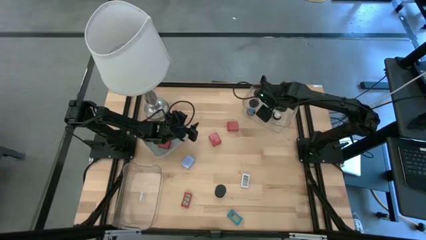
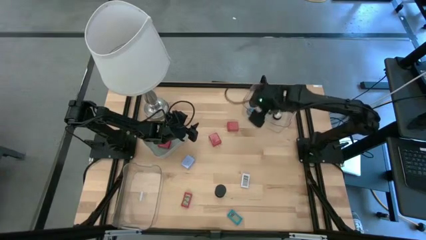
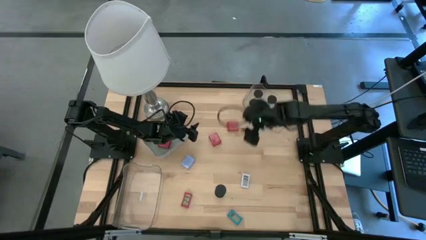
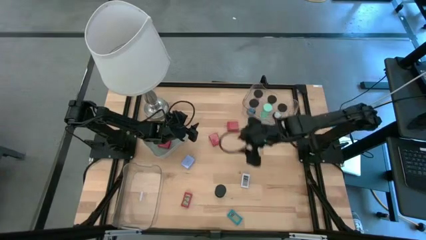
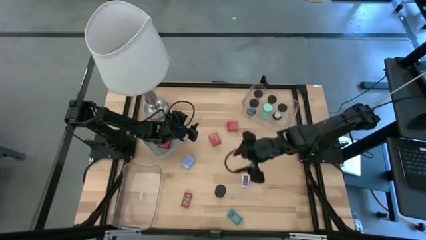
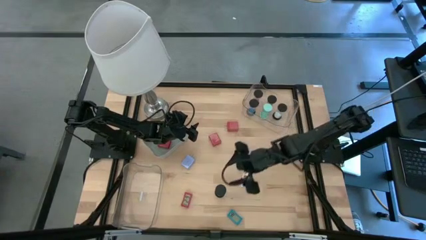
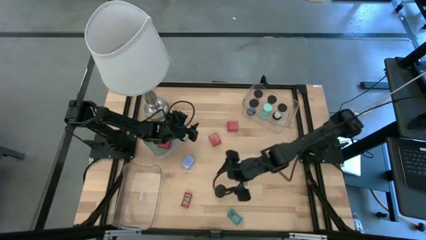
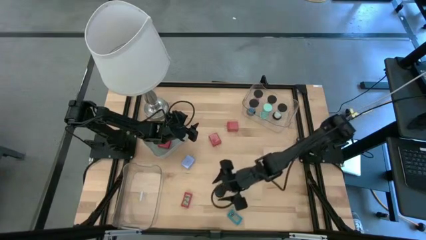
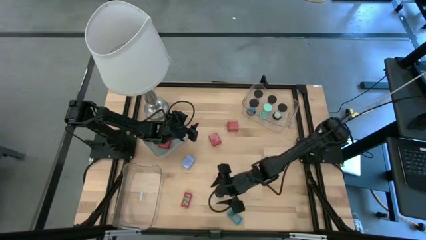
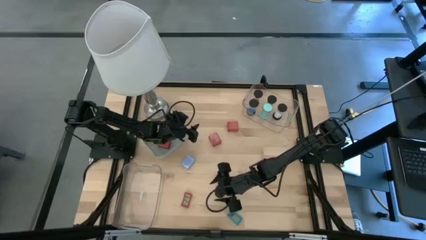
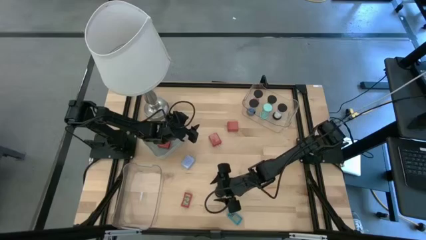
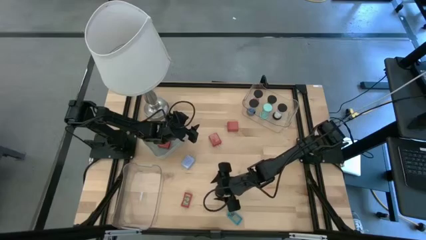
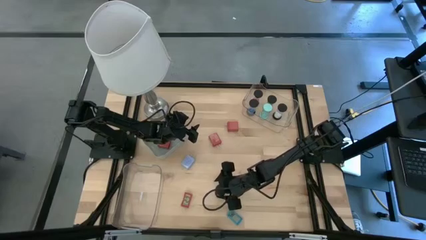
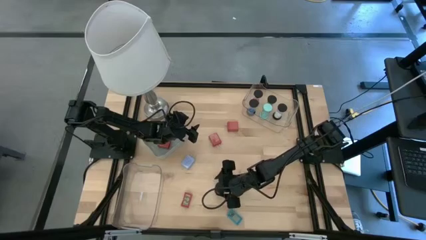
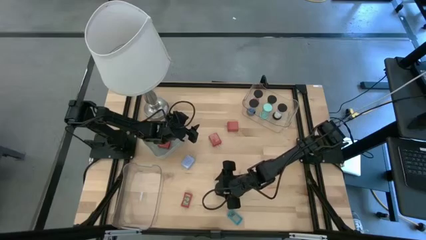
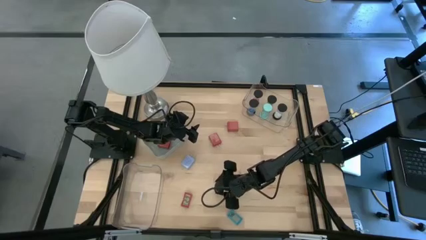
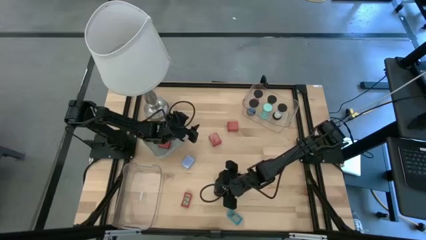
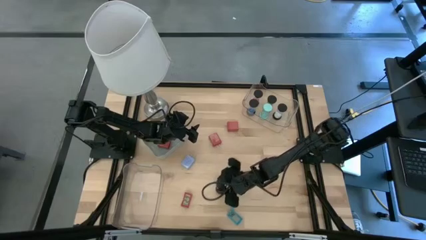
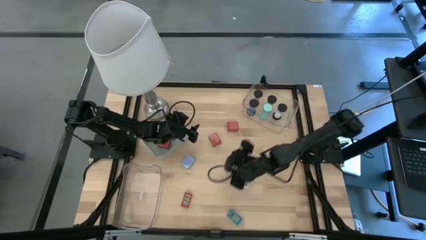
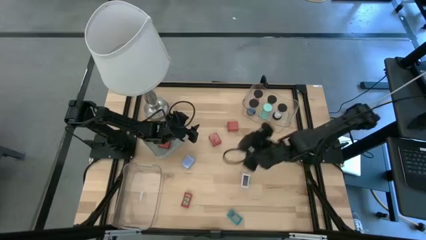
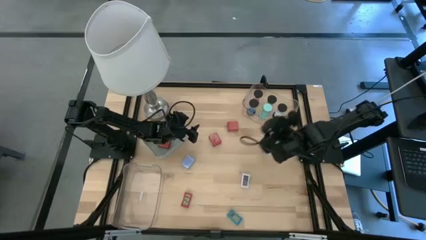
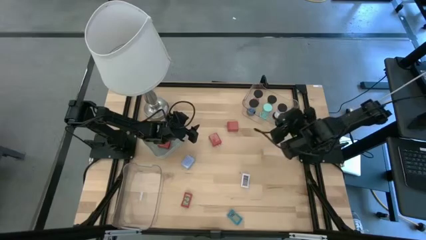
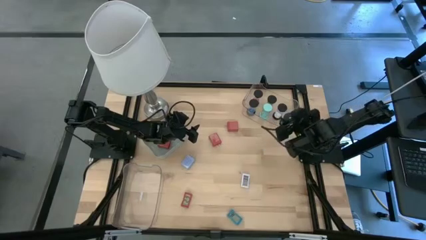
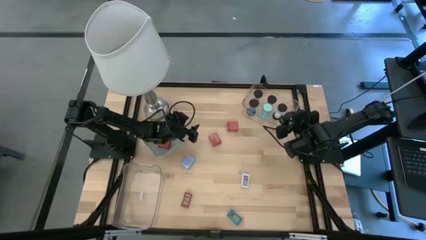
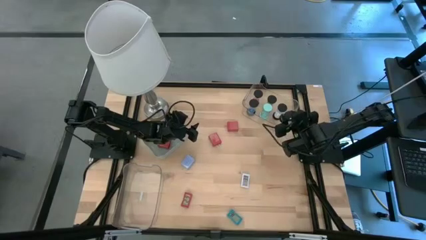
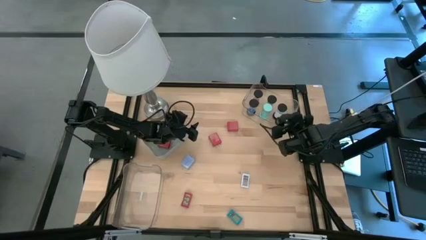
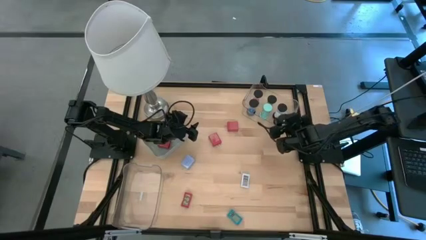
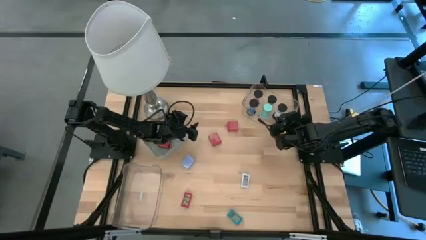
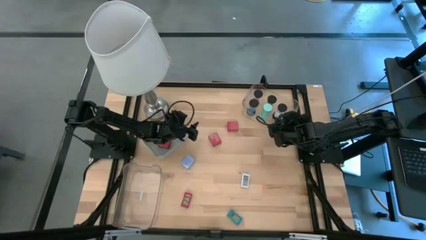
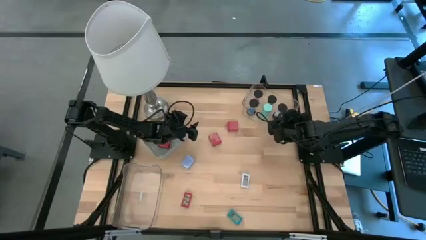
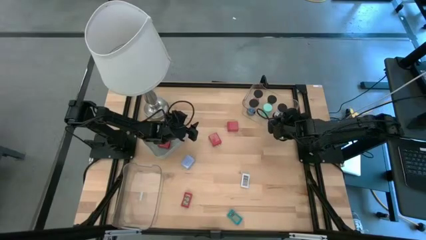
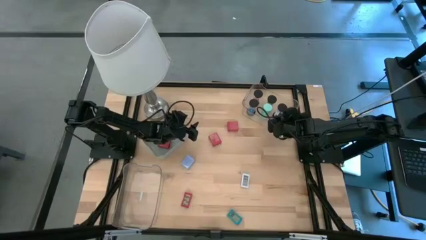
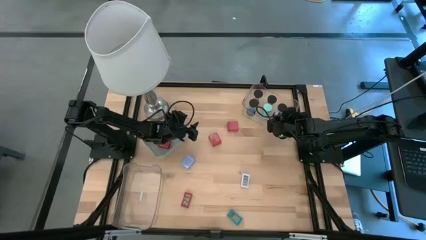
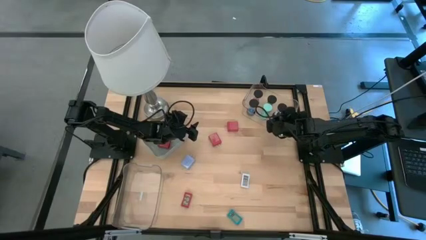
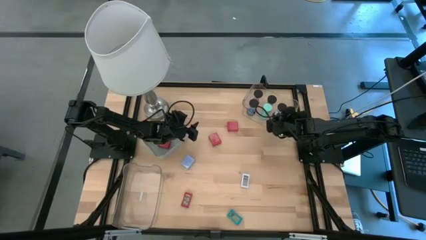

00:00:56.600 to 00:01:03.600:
Task: Pick & Place Office items
Put the blue hourglass into the top transparent bin

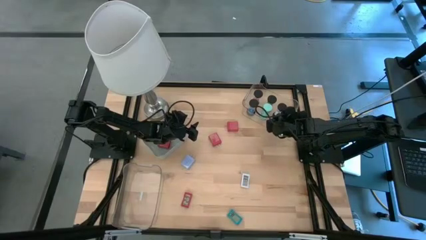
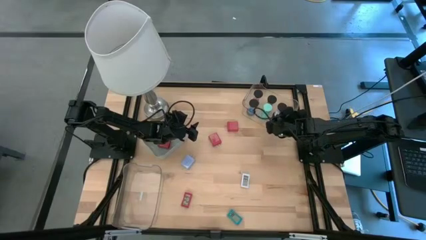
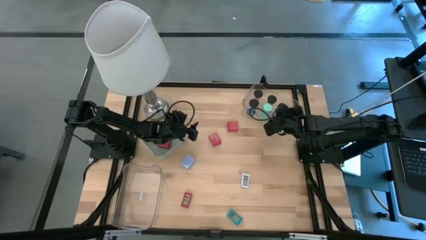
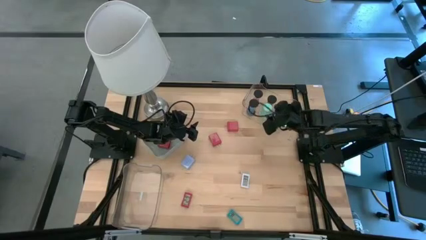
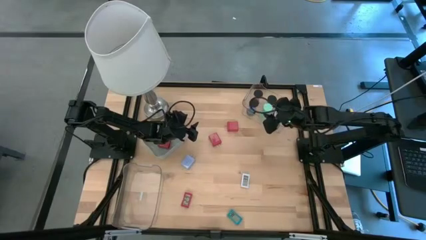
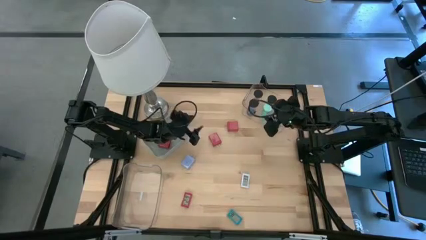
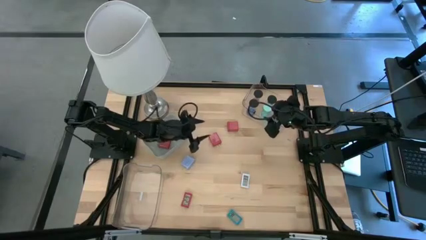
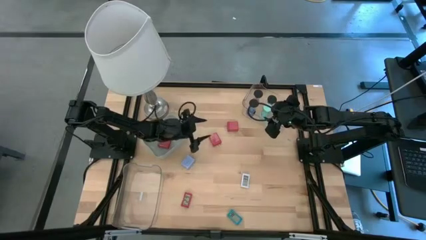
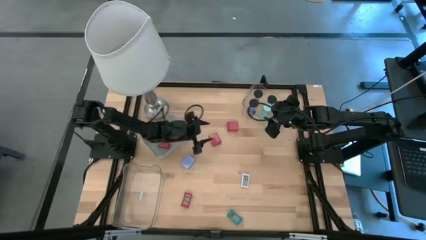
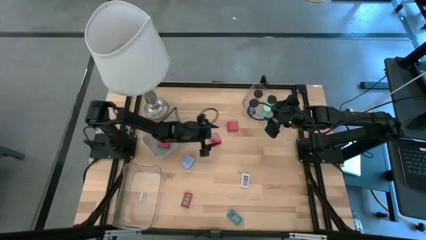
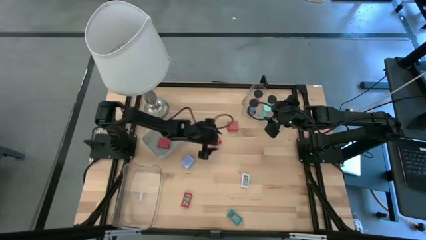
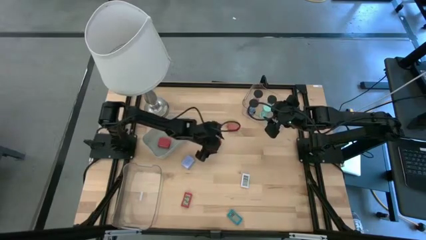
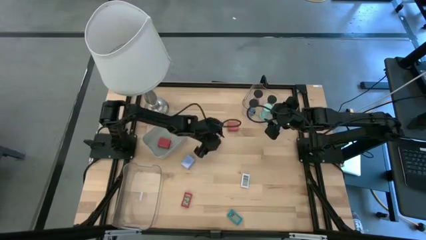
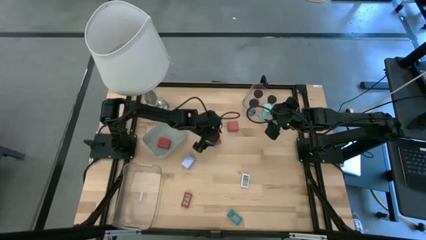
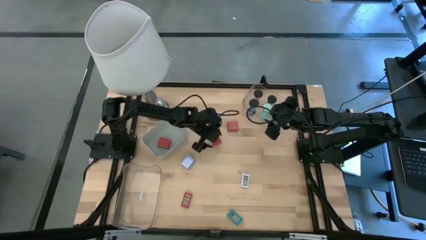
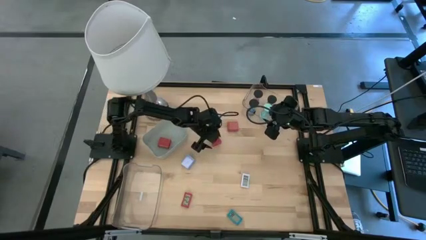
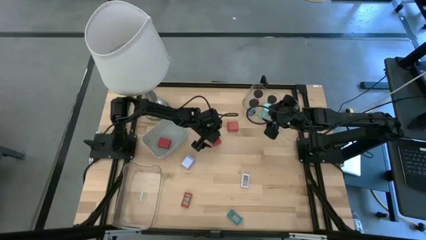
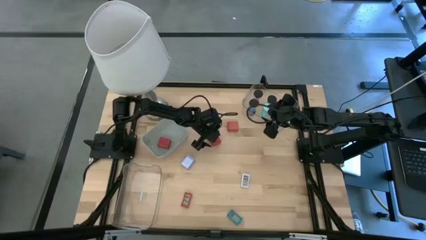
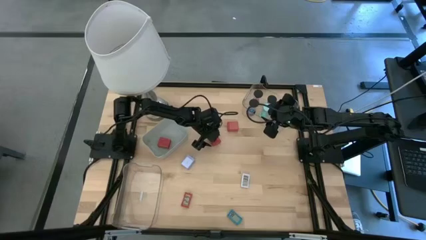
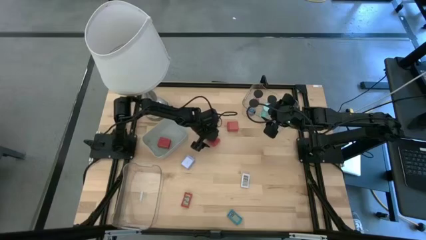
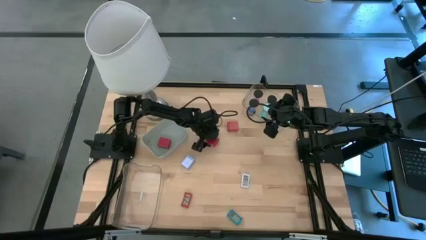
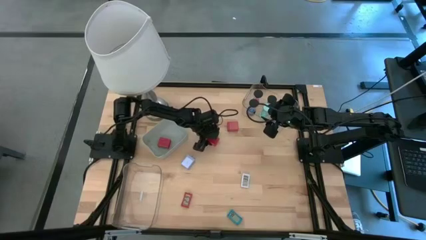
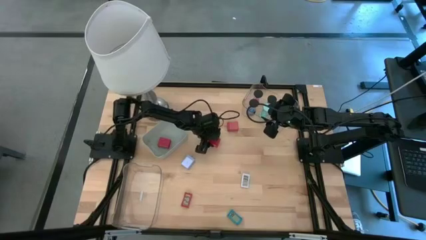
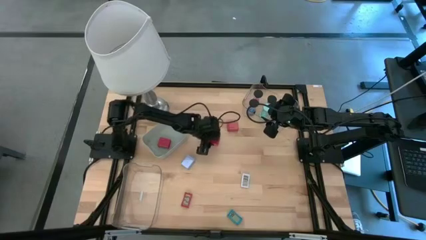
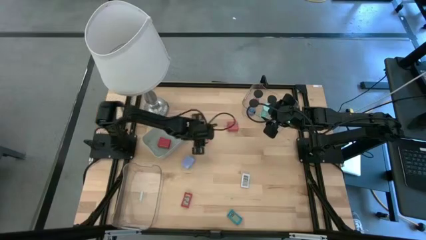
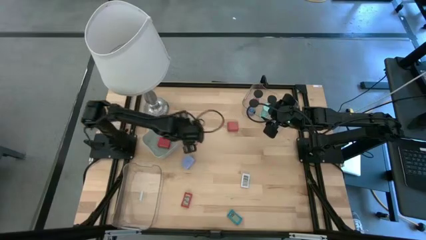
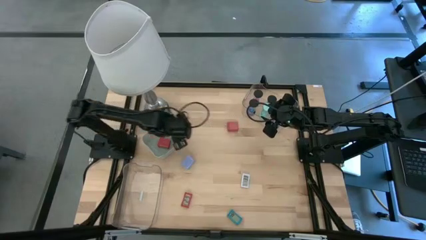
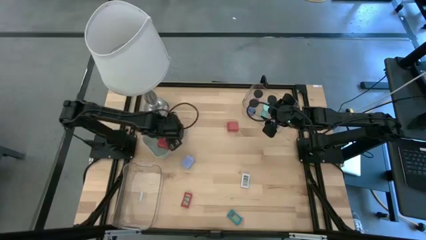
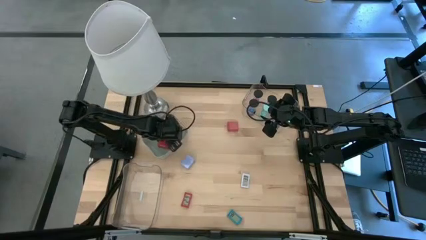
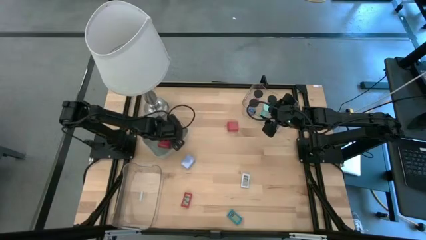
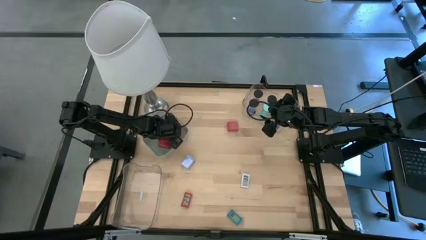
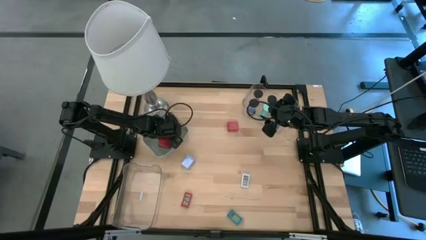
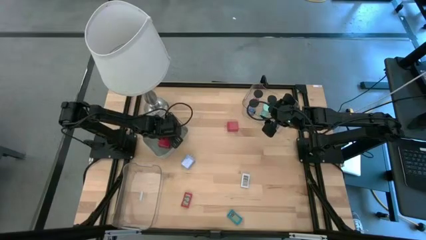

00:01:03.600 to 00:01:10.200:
Put the left red charger adapter into the gray bin

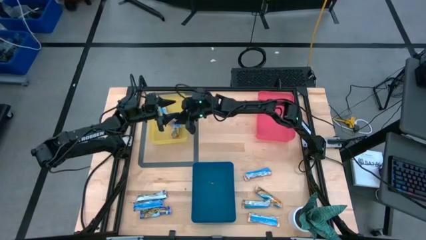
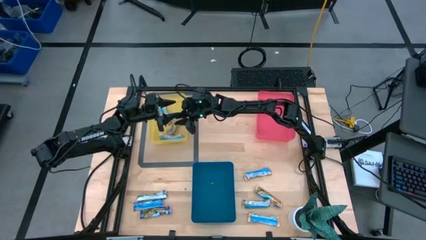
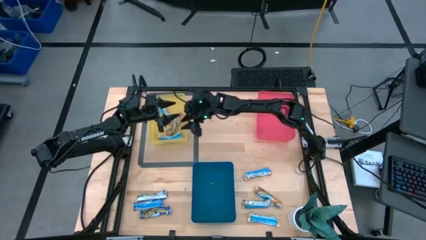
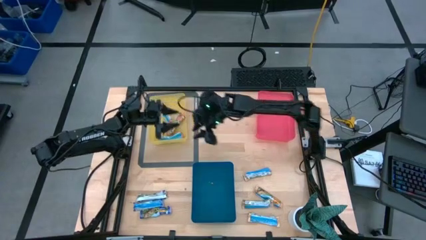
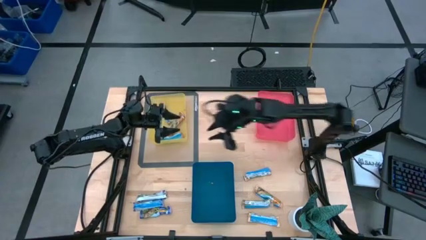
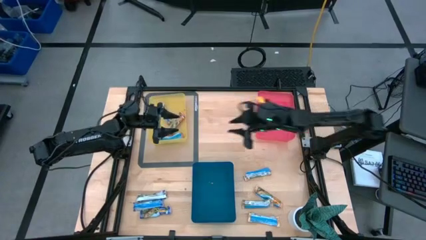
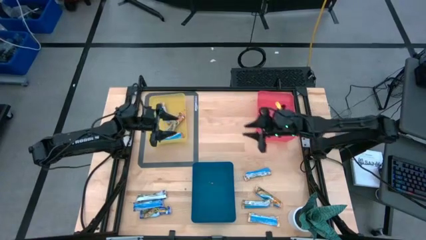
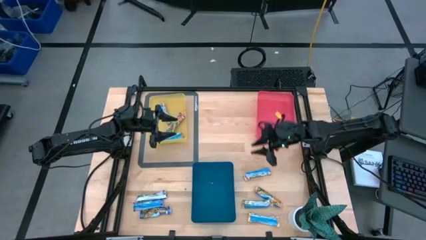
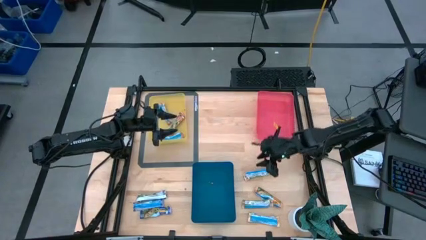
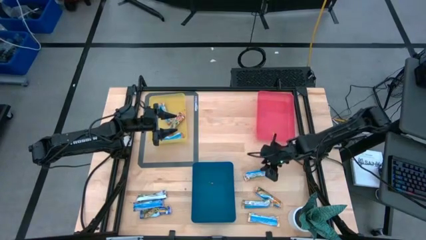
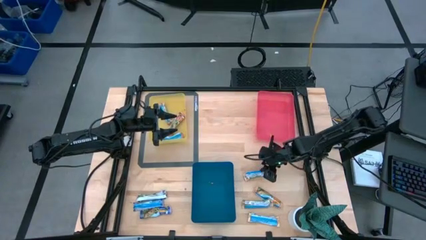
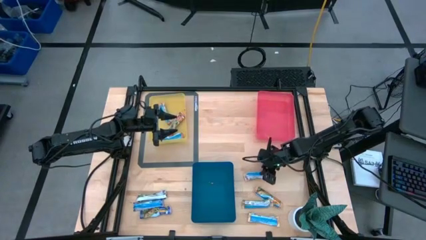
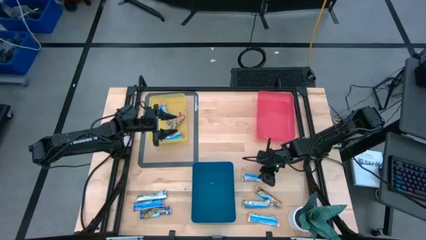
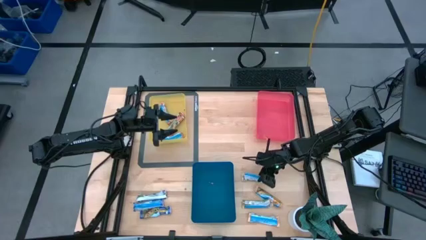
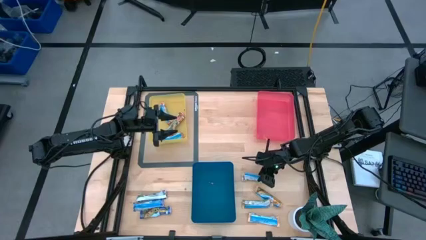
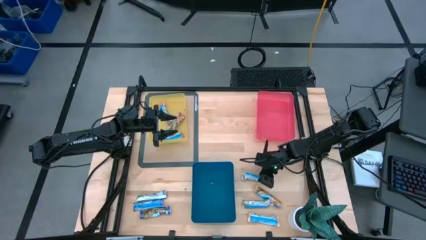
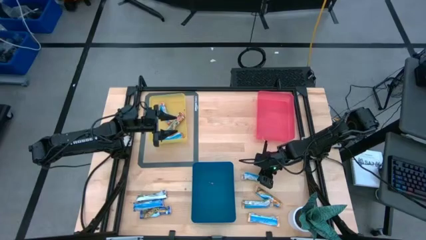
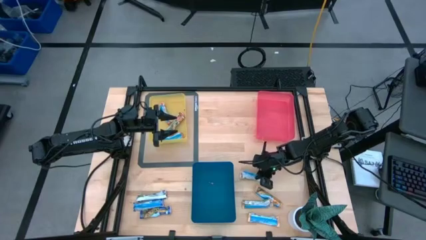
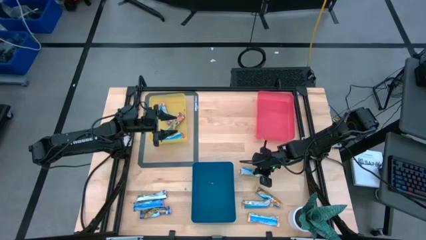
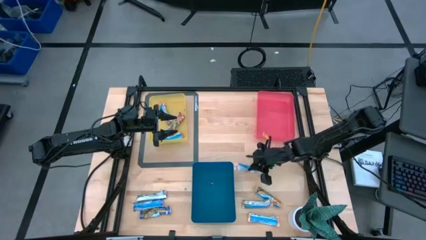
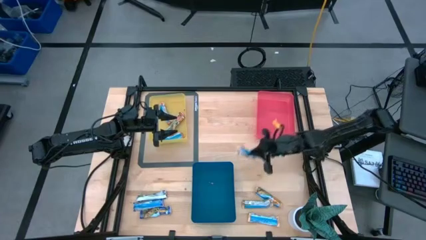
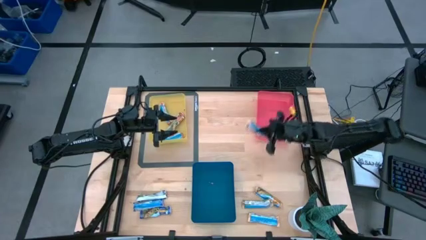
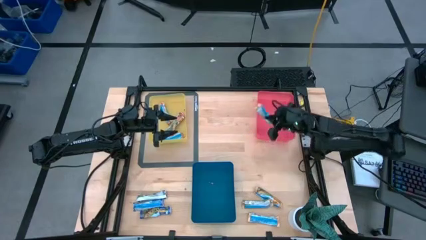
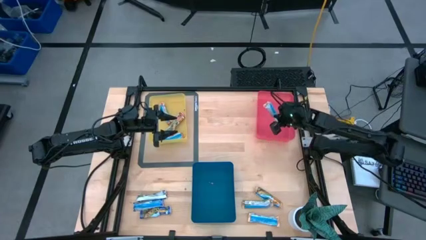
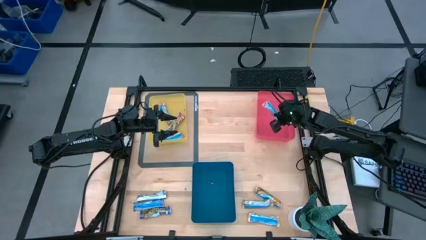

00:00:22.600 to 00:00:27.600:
Task: Pick and place Granola Bars by type
Put the yellow granola bar into the red bin
